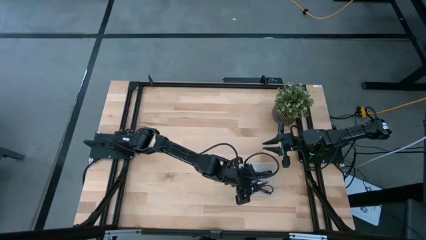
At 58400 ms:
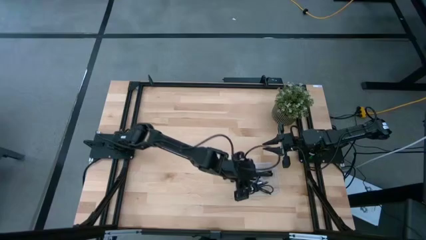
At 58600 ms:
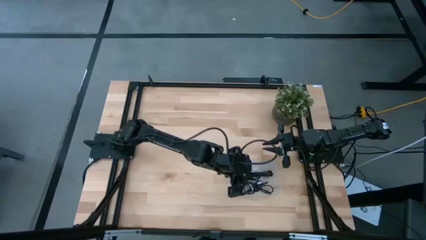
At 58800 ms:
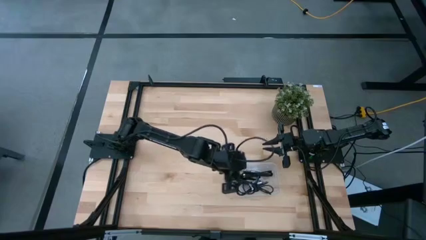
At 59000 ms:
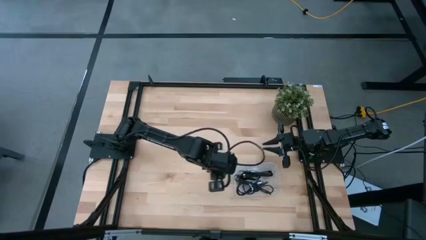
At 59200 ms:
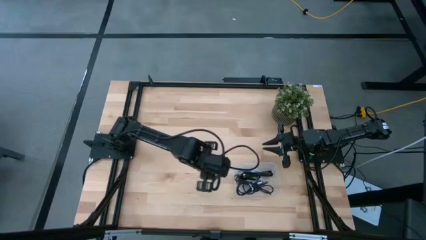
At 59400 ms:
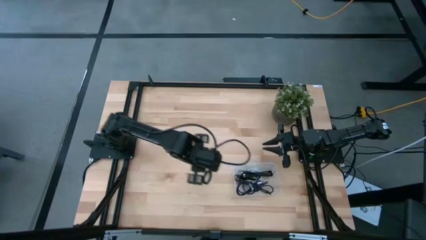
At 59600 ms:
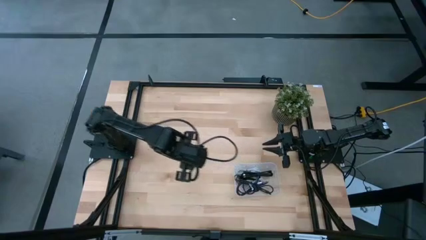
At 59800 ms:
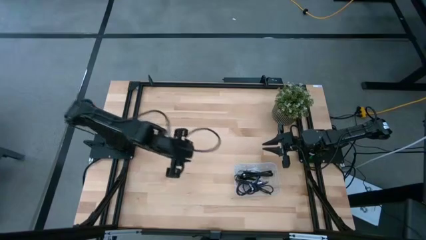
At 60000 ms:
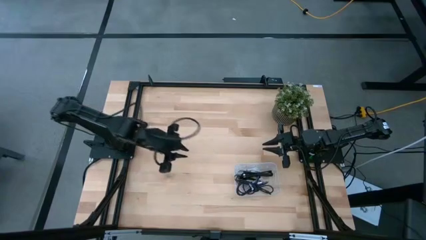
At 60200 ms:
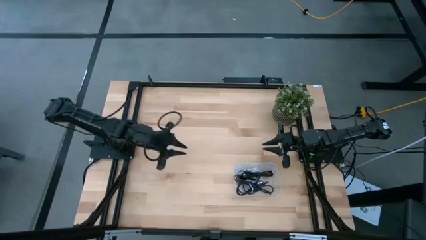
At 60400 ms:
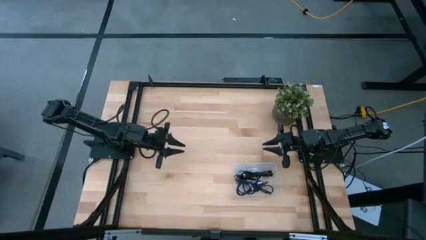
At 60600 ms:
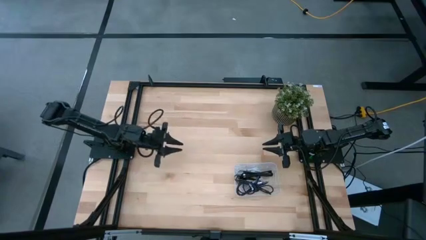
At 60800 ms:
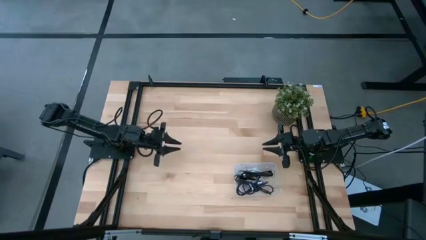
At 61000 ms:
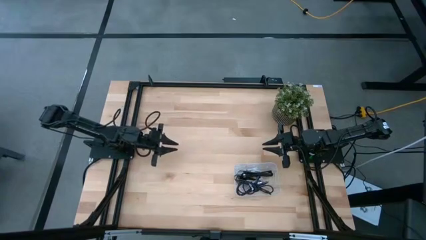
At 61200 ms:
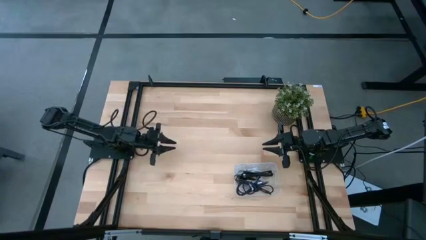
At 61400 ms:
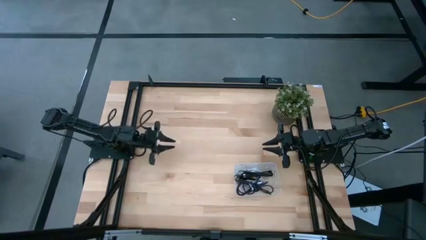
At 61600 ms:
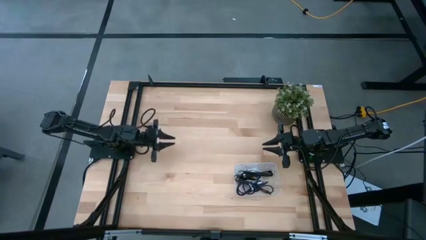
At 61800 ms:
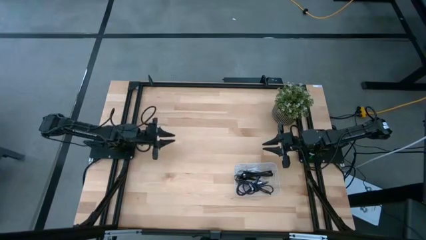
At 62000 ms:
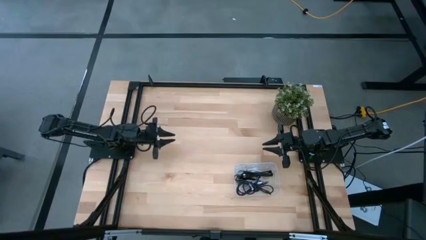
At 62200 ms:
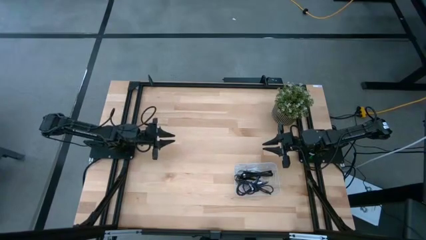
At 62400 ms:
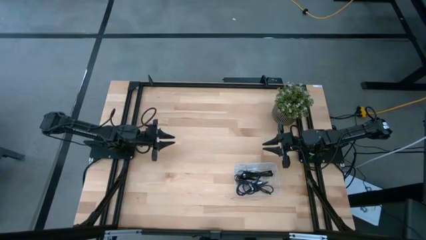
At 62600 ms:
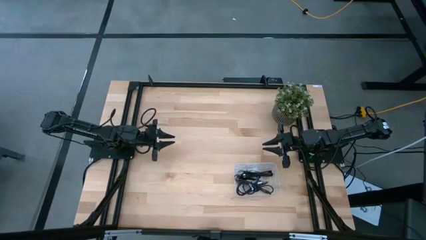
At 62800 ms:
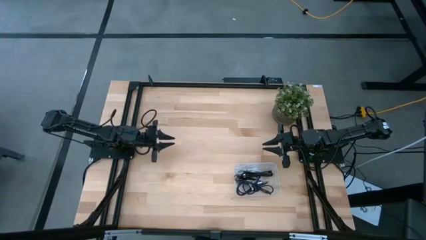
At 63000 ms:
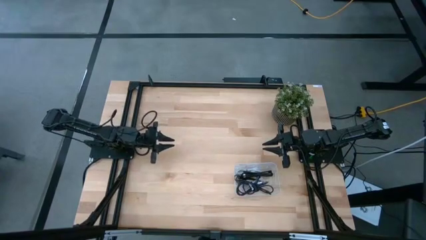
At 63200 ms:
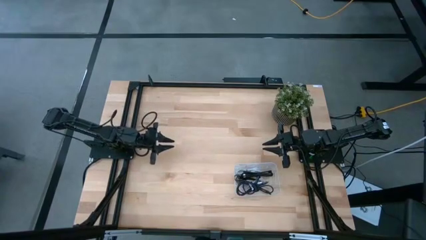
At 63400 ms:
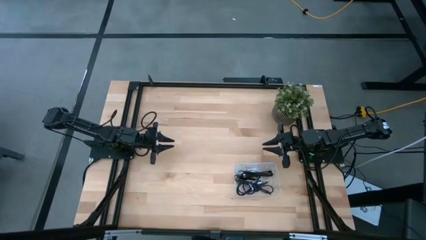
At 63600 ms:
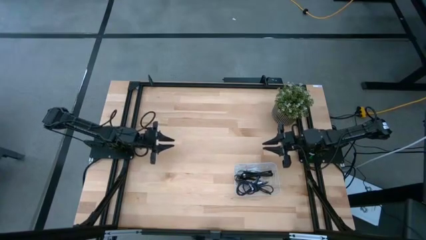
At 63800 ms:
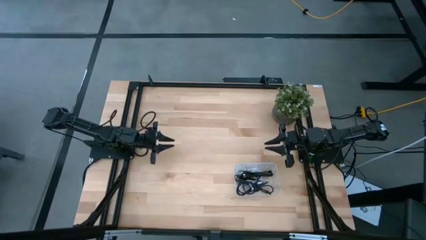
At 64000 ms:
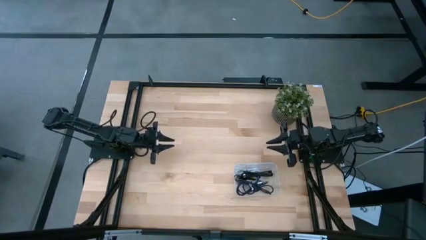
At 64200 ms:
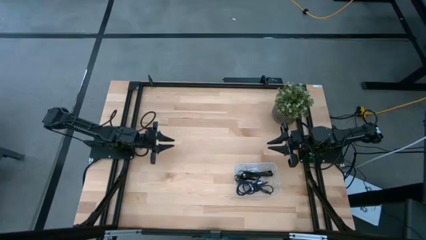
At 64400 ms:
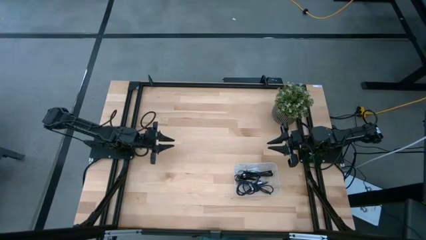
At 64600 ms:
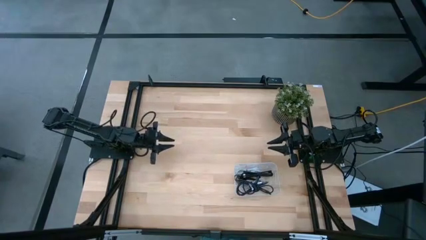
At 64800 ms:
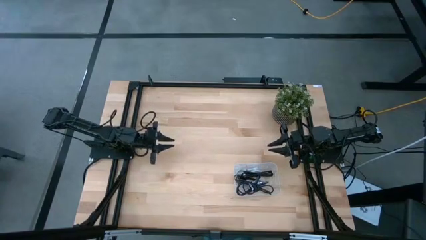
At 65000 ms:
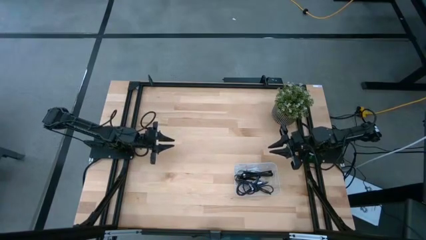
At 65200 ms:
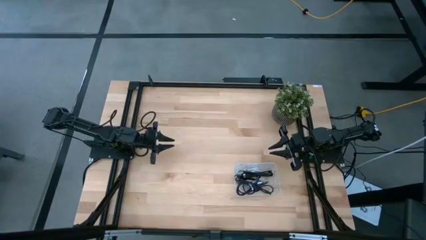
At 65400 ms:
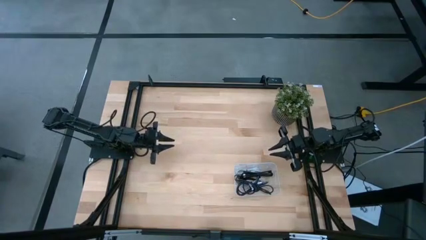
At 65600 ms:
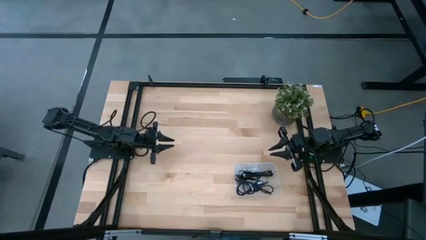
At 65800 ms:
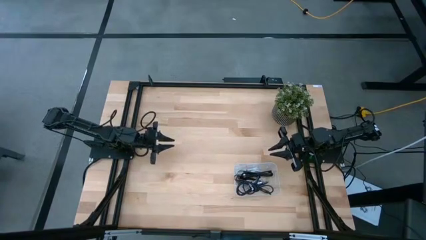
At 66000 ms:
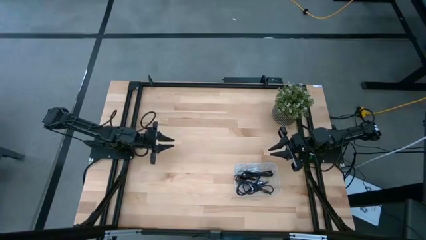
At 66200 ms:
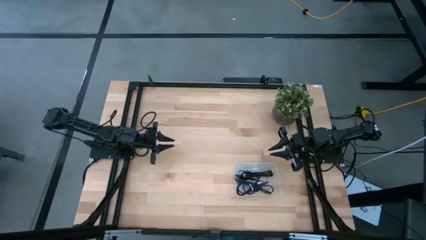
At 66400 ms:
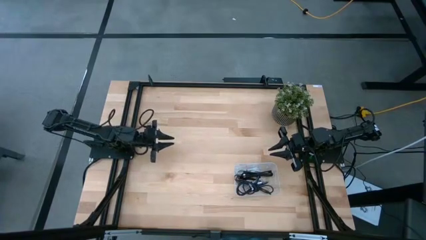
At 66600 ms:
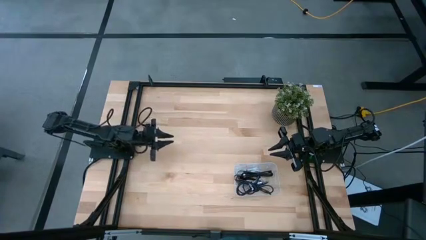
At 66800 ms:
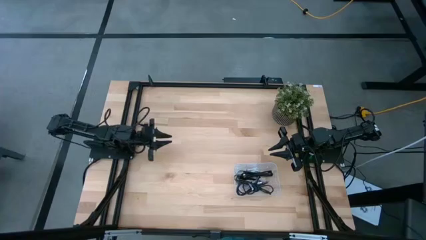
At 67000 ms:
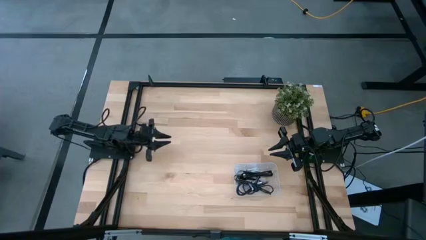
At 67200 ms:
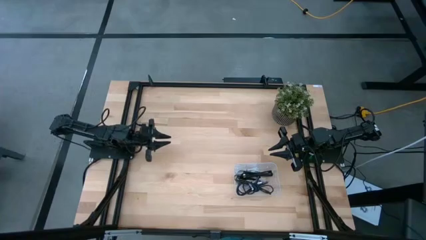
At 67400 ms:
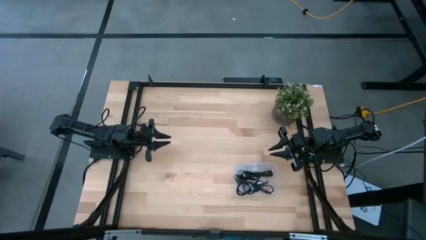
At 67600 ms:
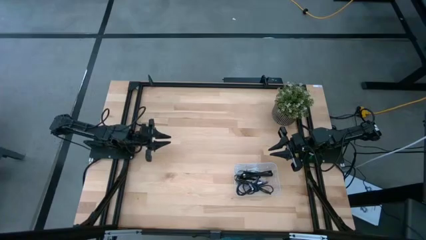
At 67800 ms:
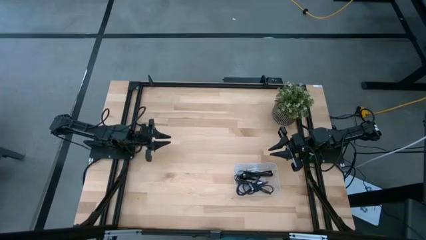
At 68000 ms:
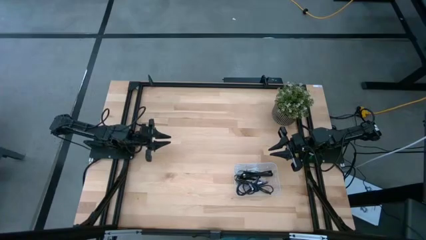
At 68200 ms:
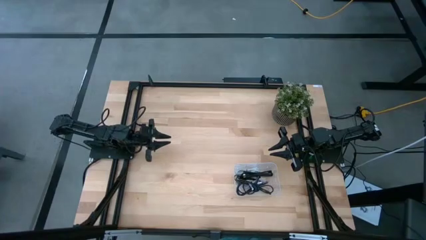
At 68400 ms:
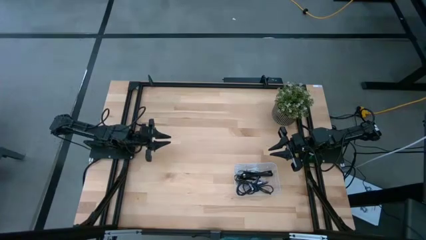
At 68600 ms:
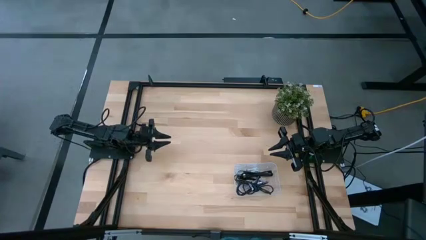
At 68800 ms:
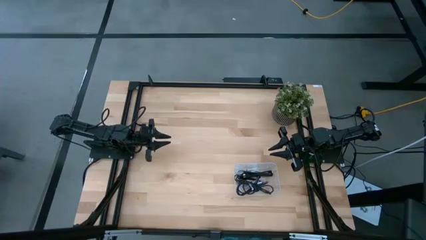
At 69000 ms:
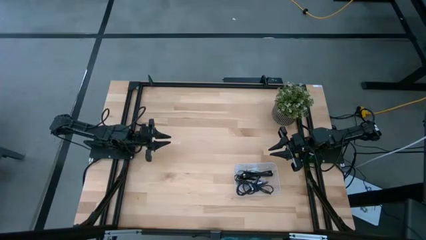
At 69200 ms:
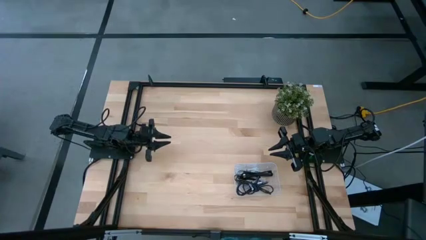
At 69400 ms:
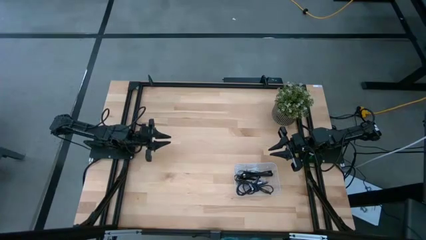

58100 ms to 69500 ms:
Task: Pick and place USB-C Cables
Return to Home Position

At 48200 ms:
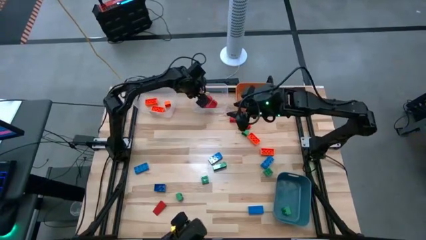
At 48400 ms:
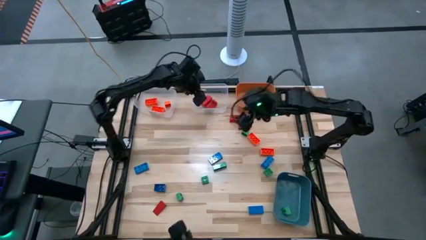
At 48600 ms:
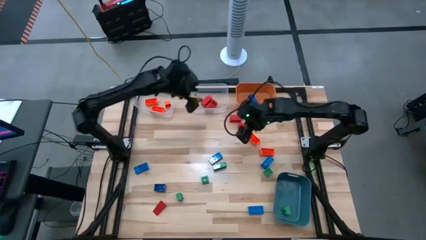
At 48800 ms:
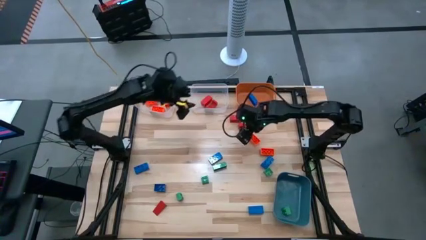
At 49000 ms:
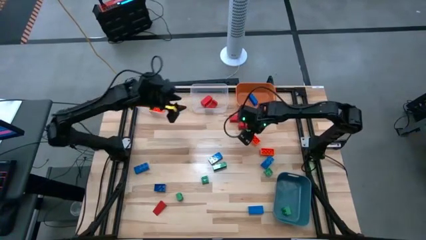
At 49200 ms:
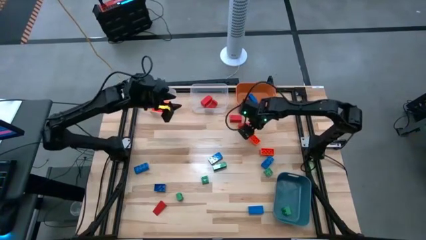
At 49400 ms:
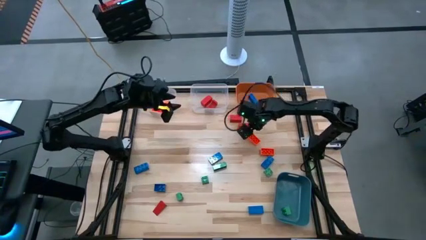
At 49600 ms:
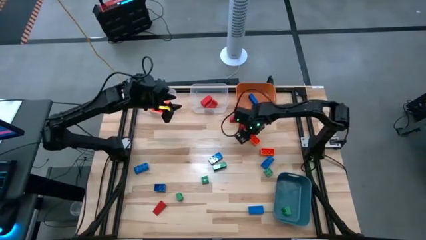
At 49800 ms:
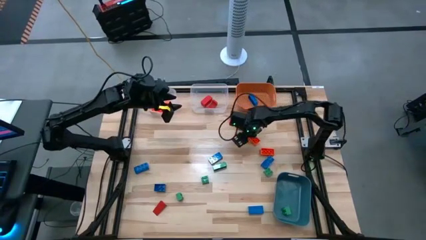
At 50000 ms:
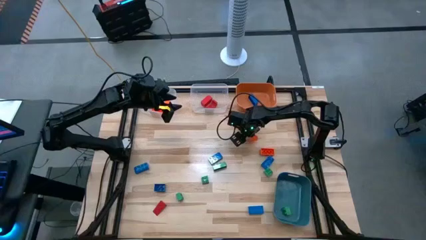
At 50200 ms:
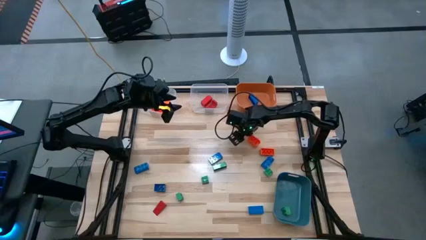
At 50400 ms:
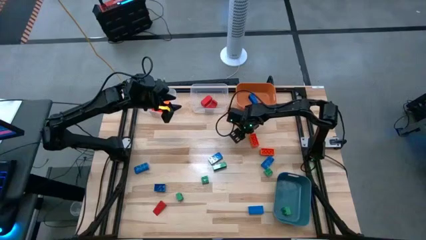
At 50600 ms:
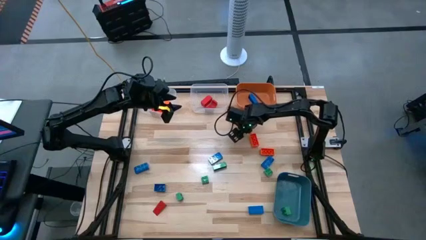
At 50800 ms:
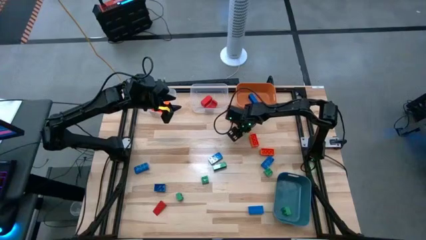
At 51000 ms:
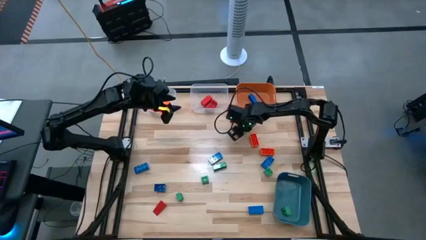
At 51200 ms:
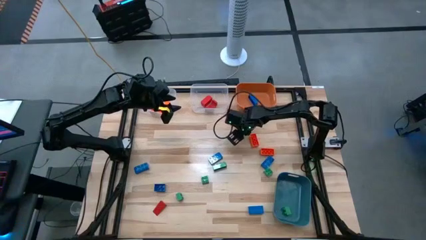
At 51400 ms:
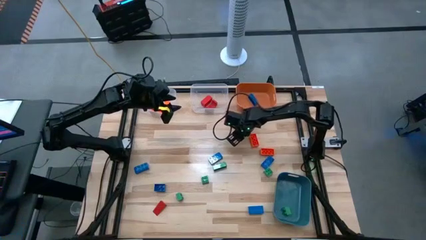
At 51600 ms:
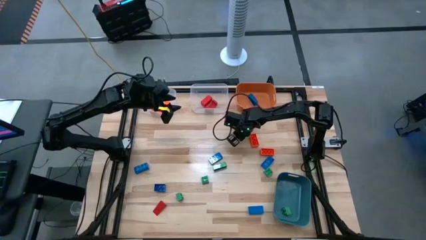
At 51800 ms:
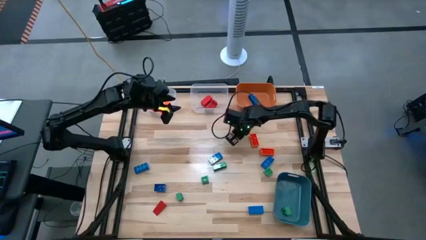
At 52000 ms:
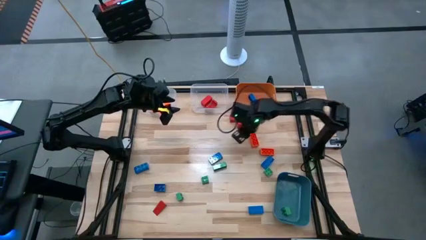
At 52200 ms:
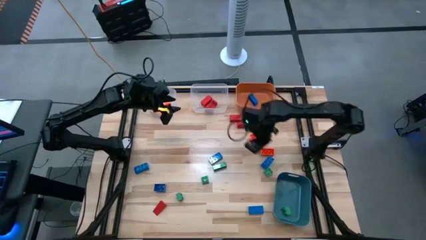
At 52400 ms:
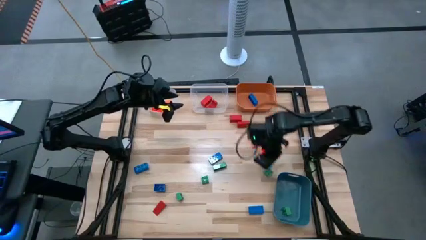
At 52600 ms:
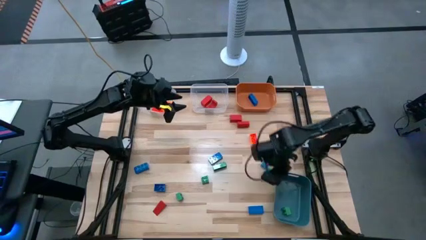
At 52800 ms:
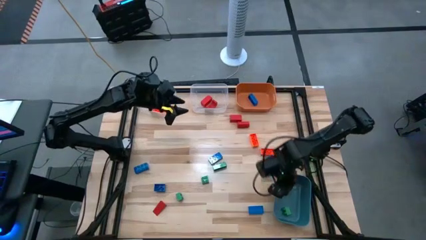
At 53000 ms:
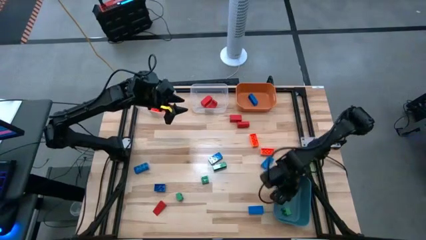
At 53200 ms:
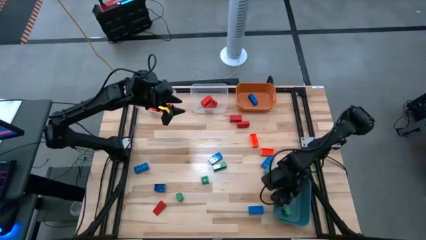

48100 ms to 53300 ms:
Task: Sort blocks
Put the green game piece into the blue bin
